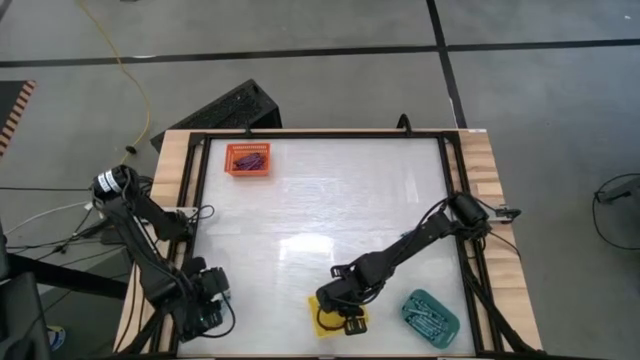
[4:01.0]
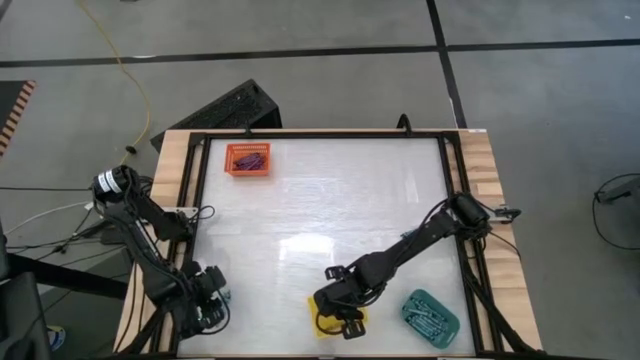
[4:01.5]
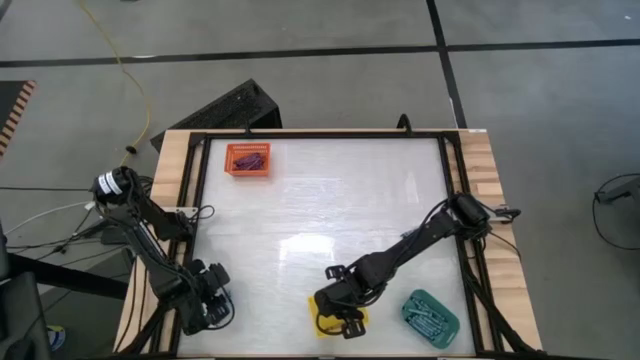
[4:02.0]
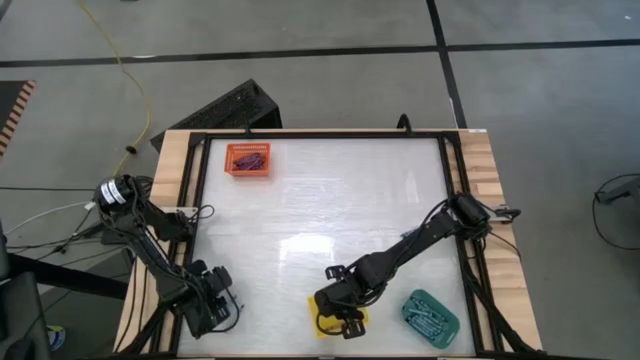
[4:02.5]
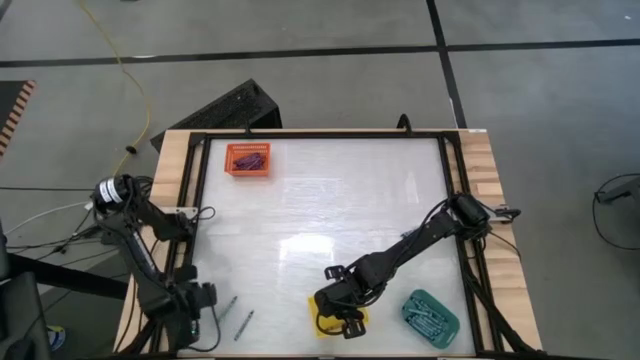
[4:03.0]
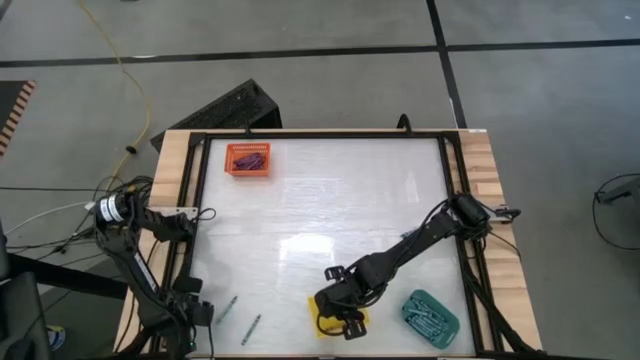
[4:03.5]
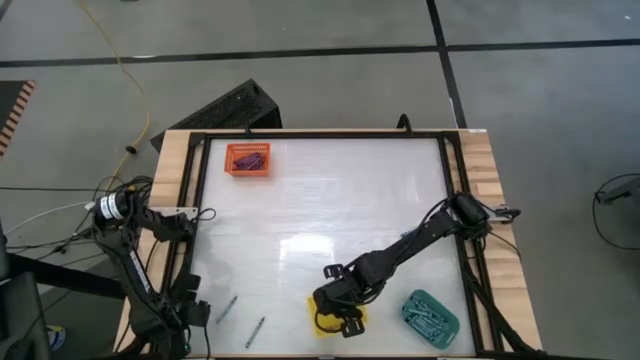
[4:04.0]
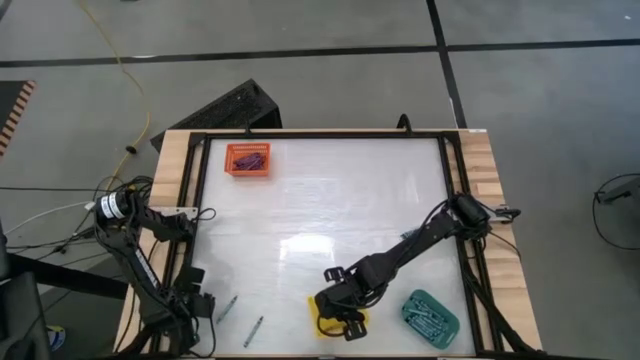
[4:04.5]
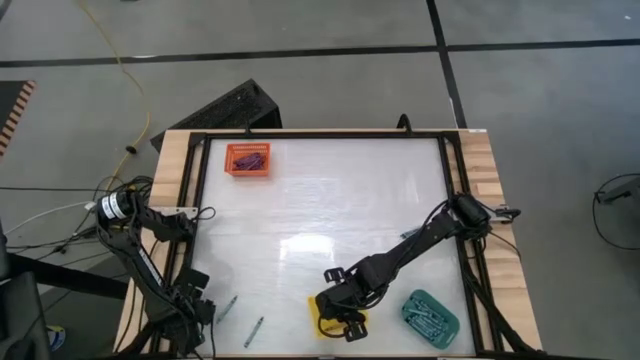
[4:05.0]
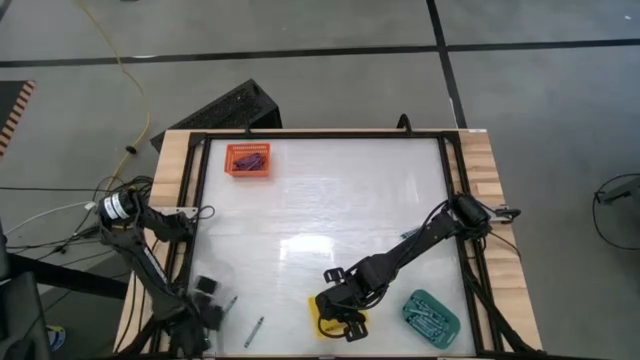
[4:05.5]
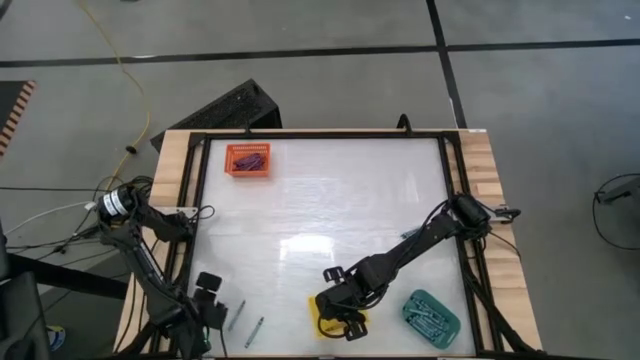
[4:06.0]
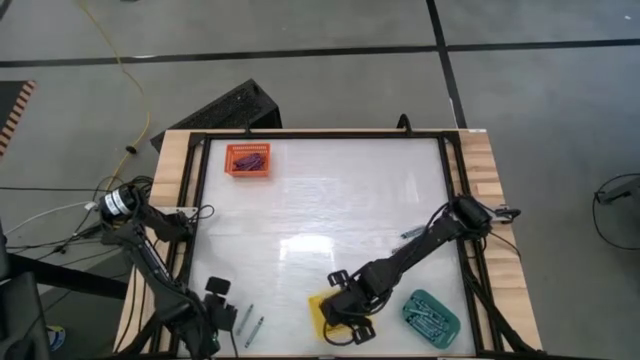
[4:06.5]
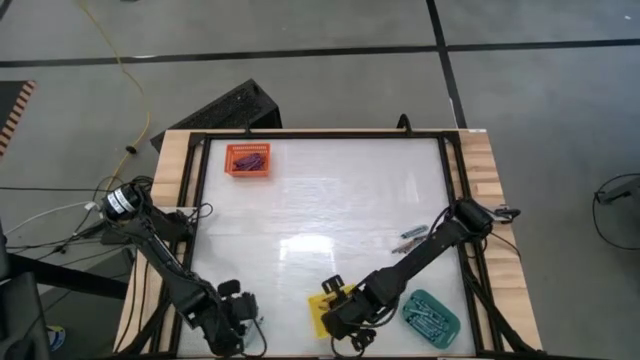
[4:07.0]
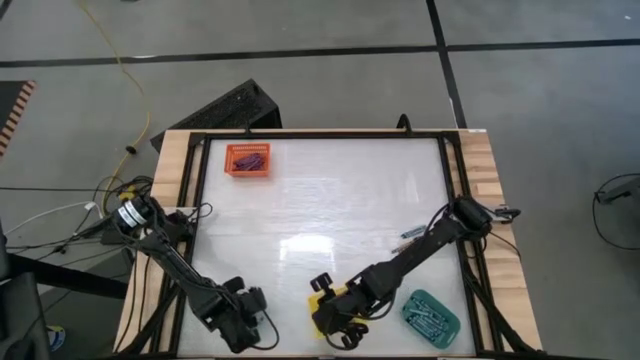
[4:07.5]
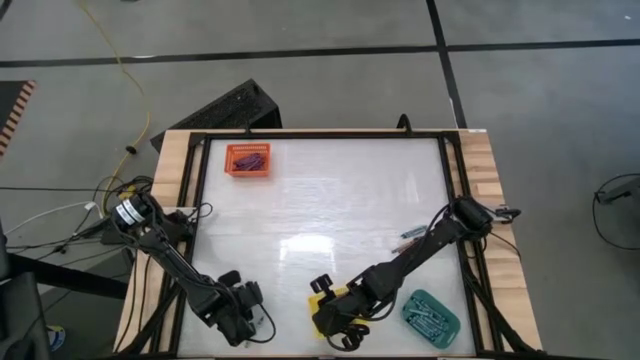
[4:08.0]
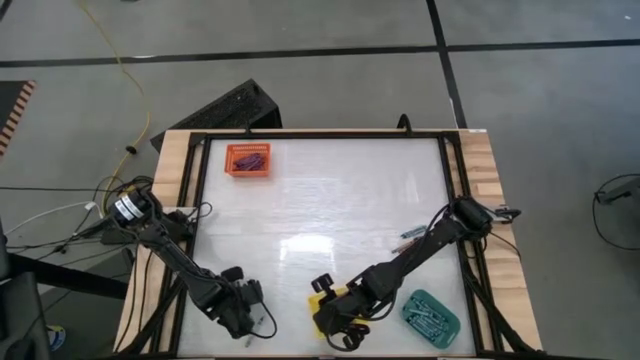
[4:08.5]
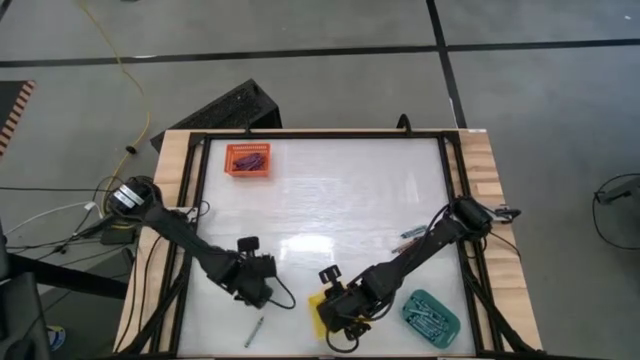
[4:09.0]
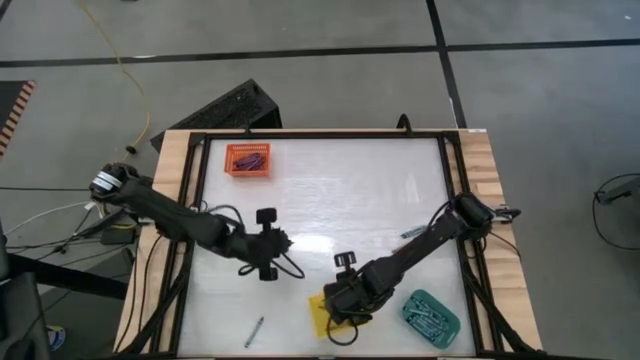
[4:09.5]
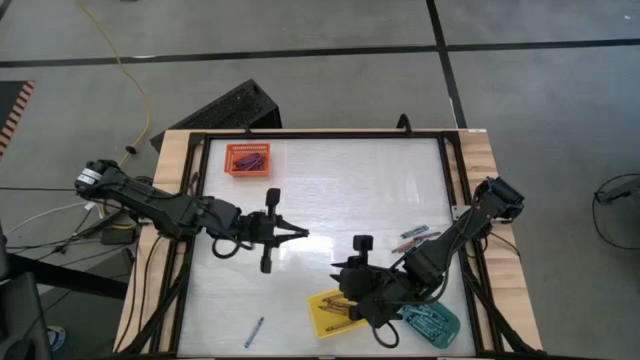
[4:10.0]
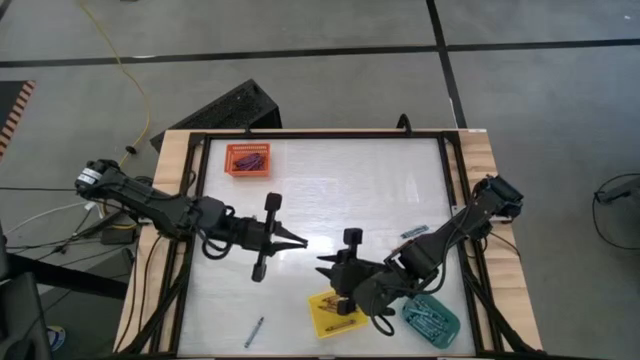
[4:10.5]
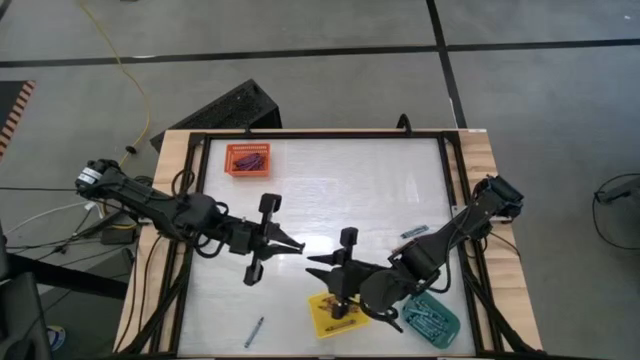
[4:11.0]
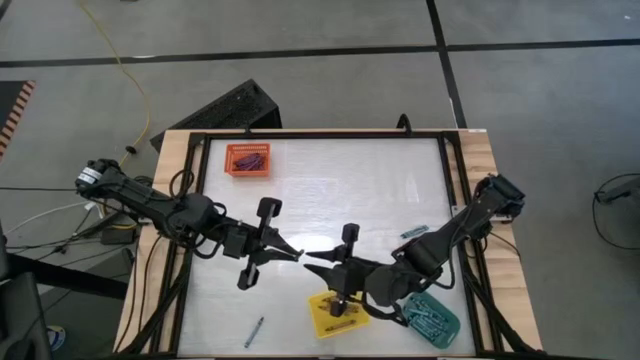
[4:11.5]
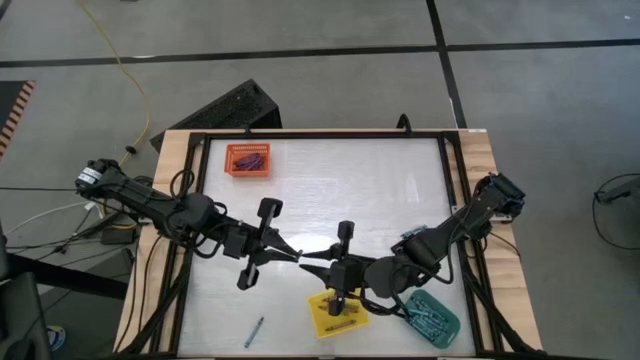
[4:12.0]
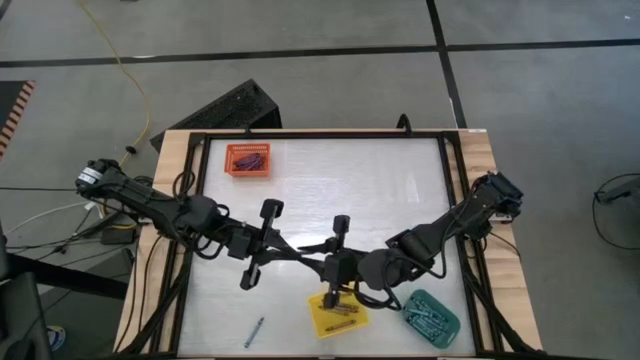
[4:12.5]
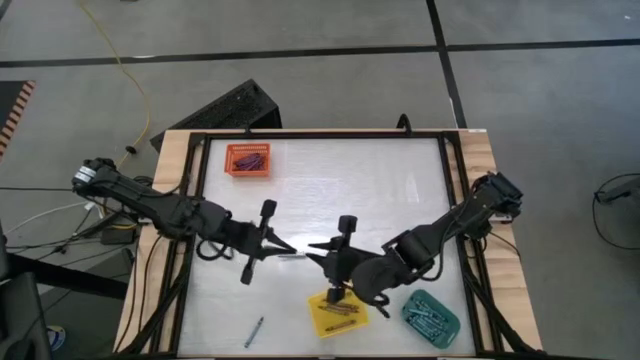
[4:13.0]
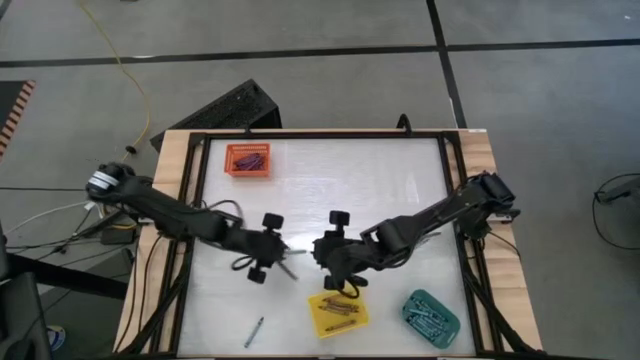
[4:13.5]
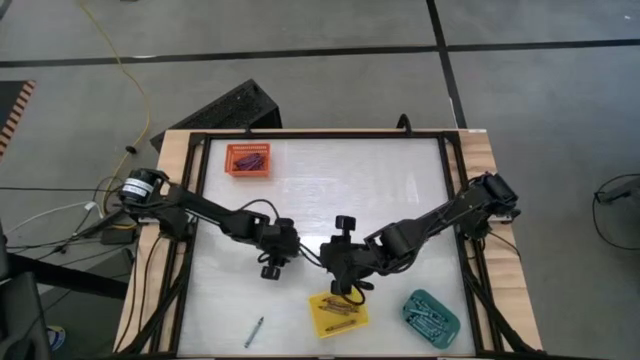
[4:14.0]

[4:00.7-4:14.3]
Task: Sort crayons
Put the green crayon into the green bin

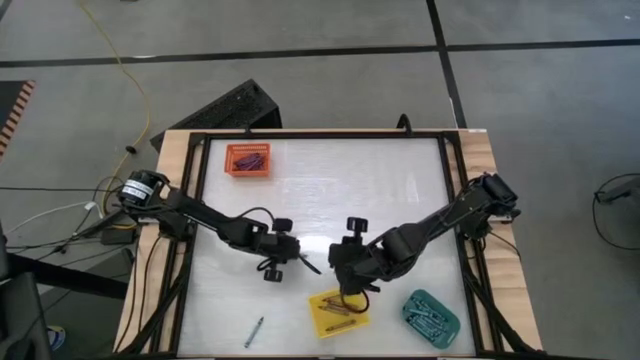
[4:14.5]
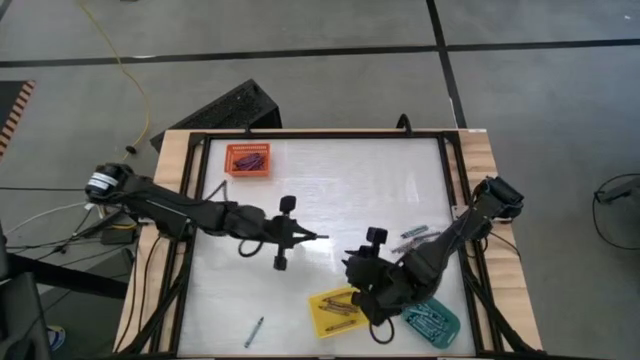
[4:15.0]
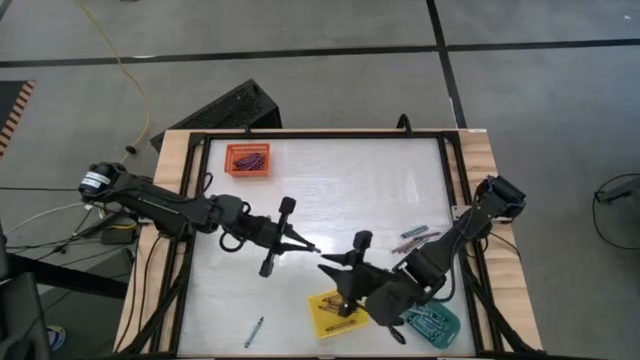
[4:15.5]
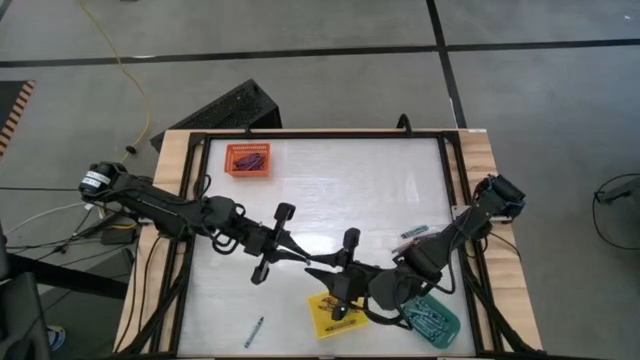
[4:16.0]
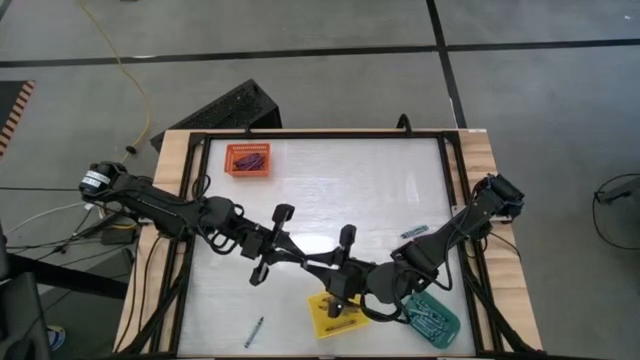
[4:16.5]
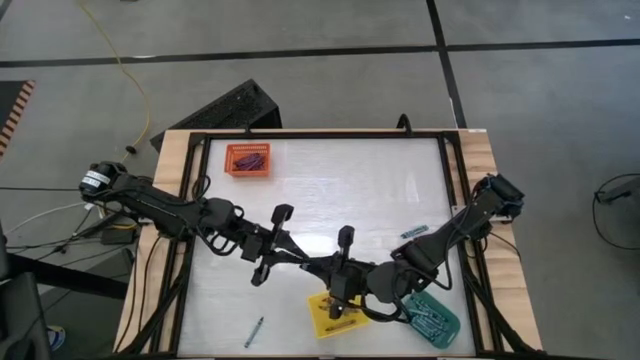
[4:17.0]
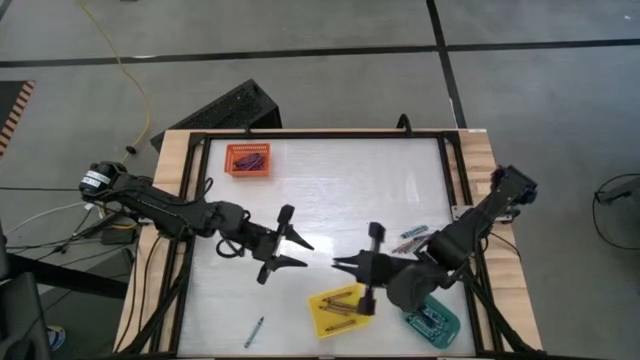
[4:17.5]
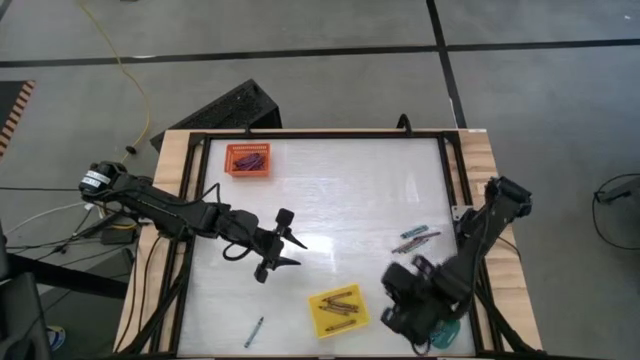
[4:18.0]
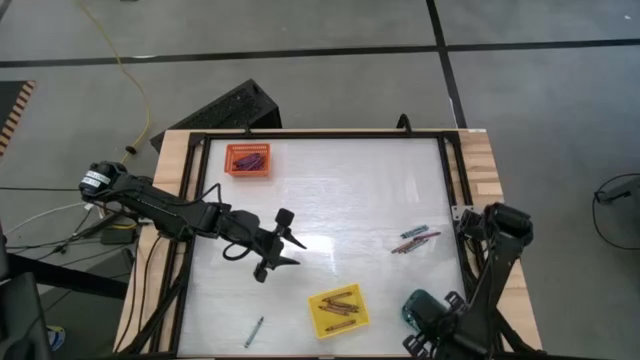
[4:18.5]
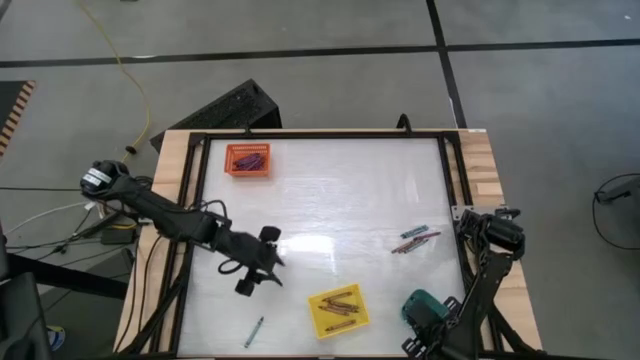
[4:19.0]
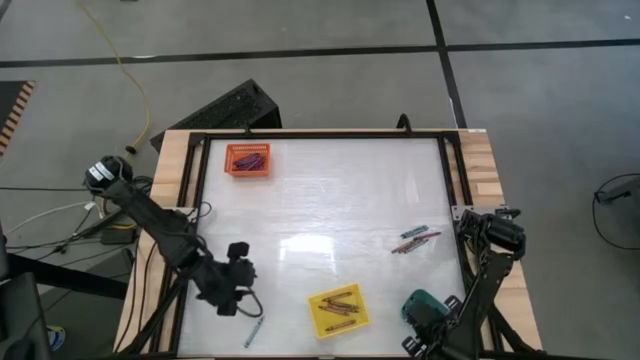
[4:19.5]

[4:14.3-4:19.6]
Put the green crayon into the green bin

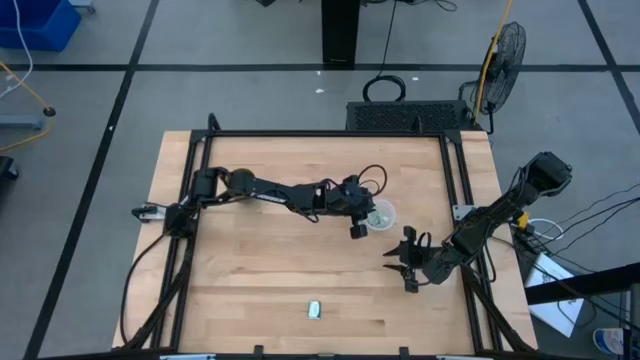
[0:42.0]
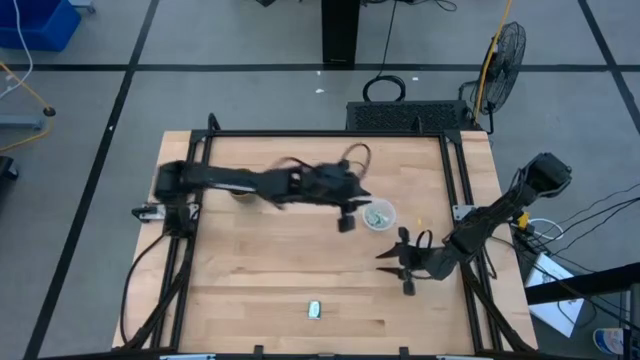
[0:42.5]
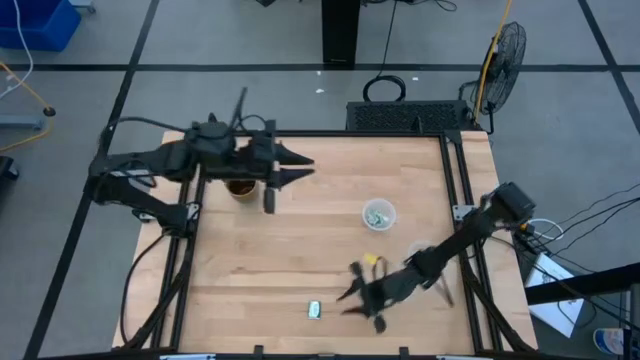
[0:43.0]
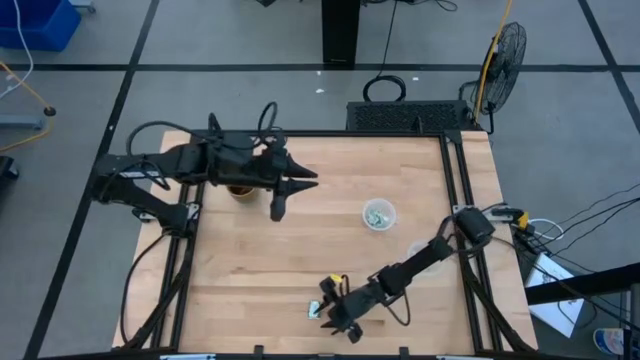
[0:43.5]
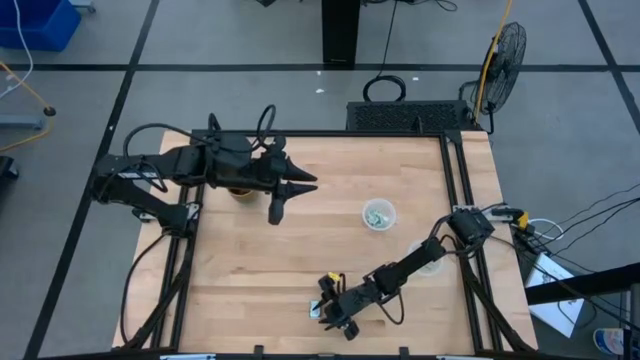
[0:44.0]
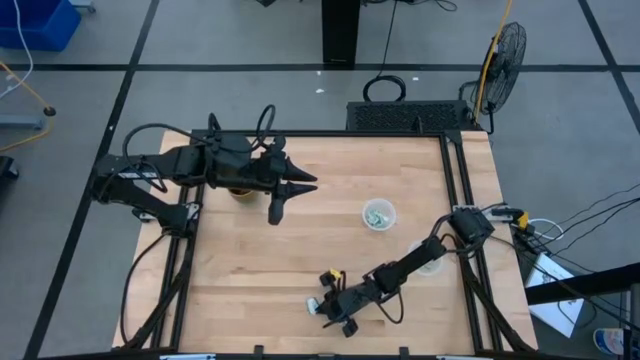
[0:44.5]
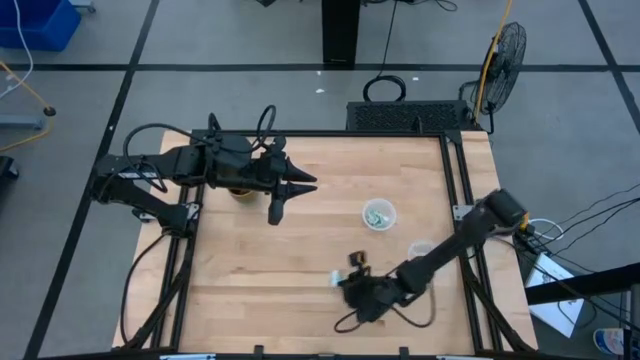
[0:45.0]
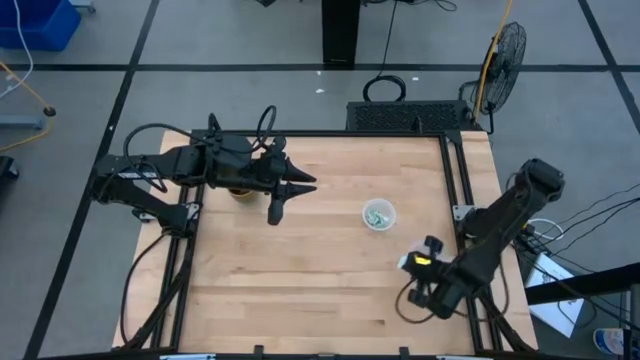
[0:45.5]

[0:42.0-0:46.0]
Task: Pick and place items into bin
Put the green stevia packet into the bottom transparent bin
